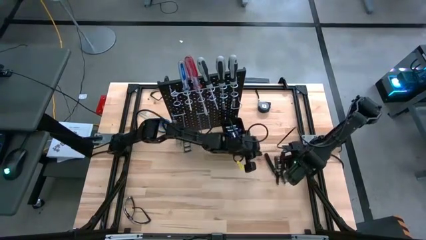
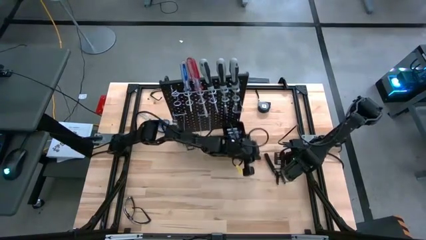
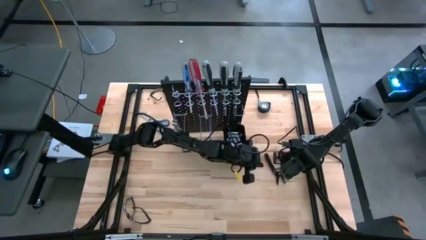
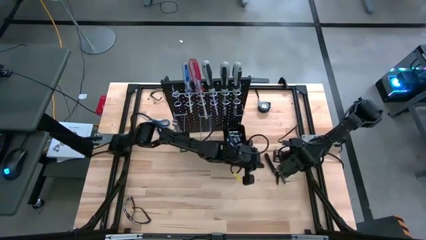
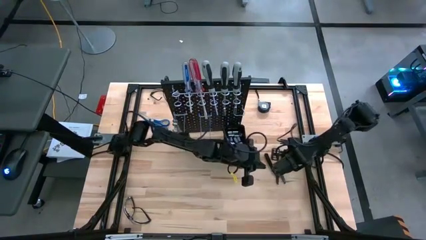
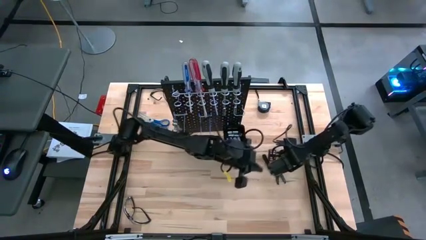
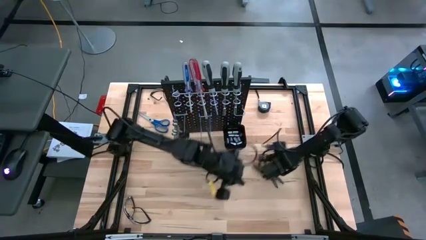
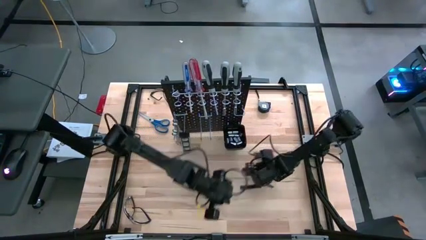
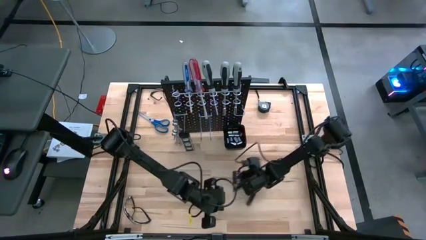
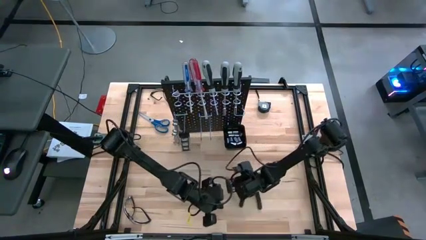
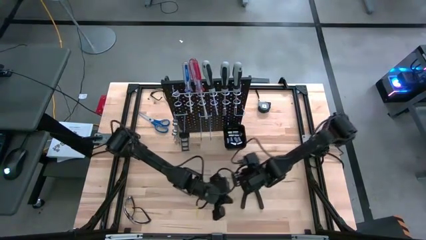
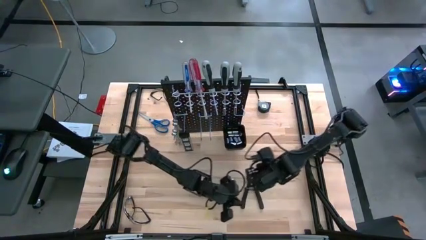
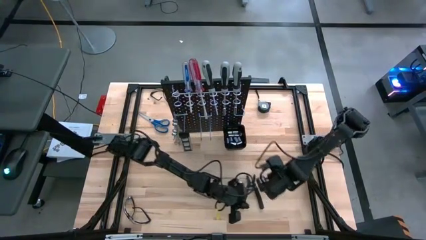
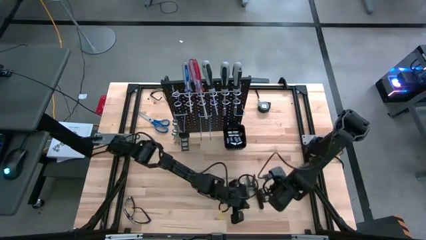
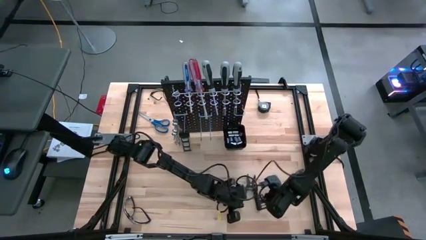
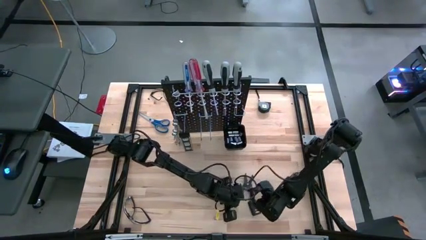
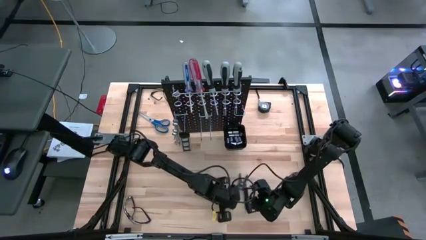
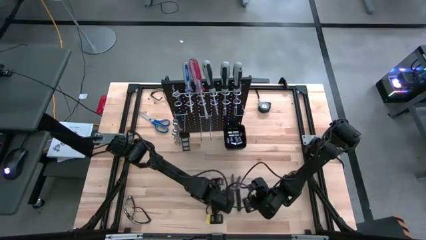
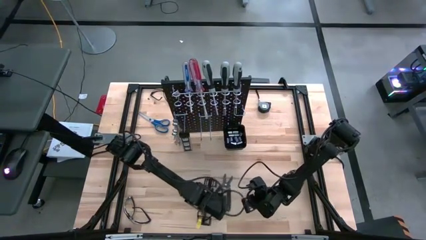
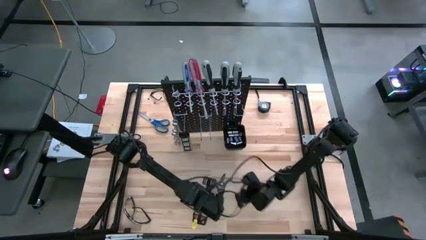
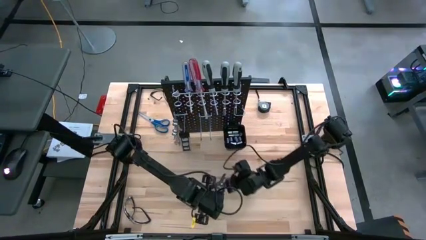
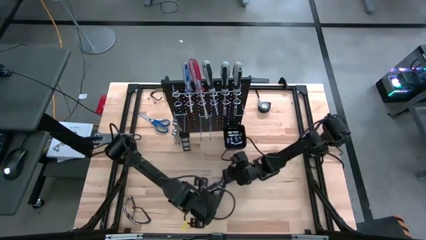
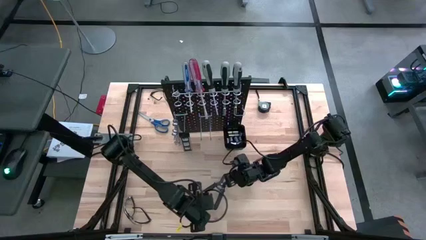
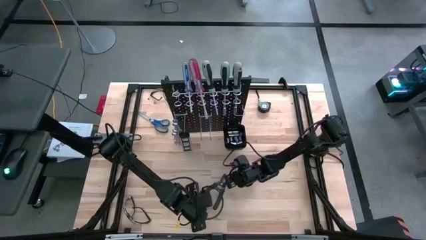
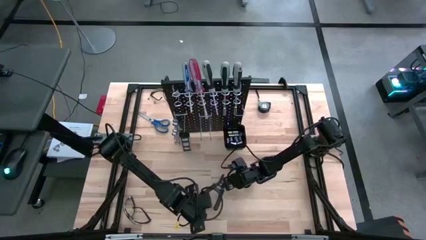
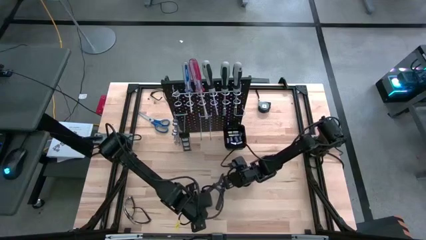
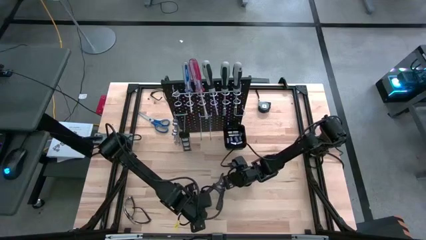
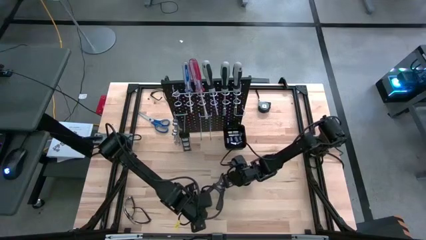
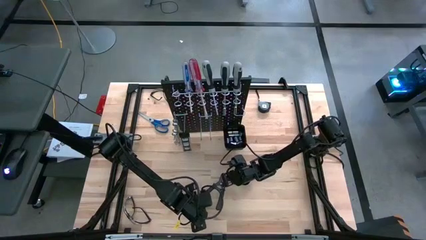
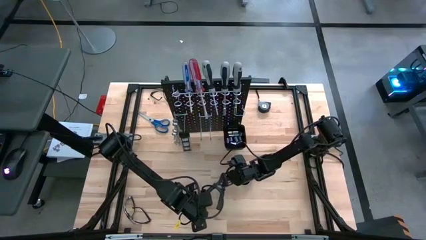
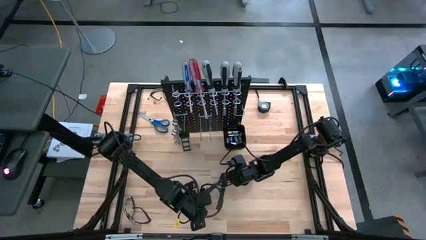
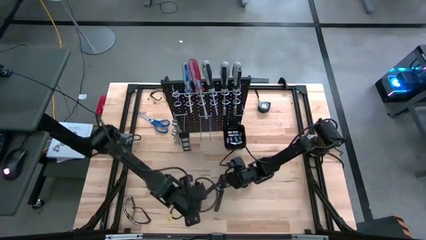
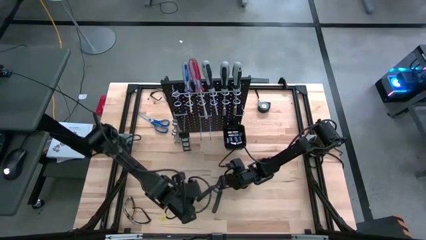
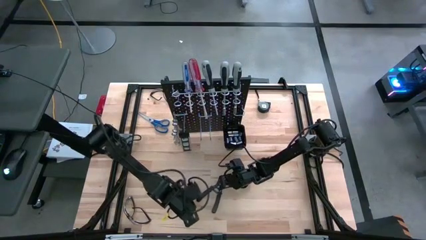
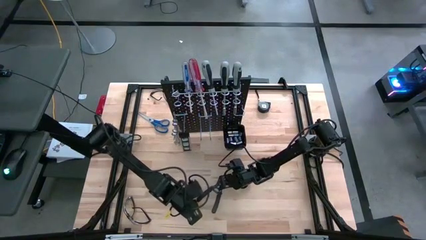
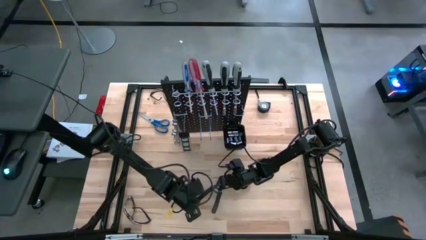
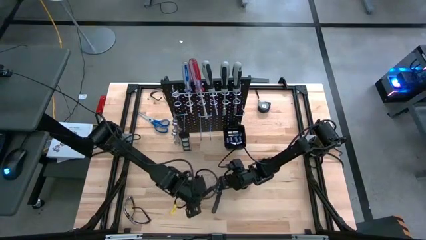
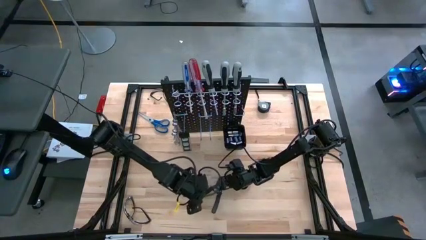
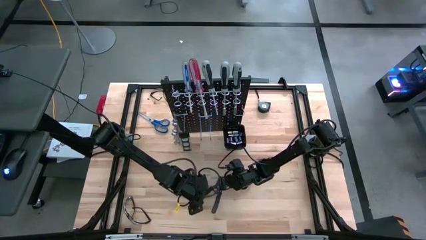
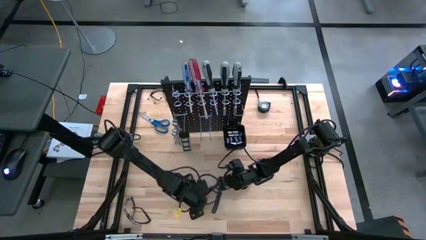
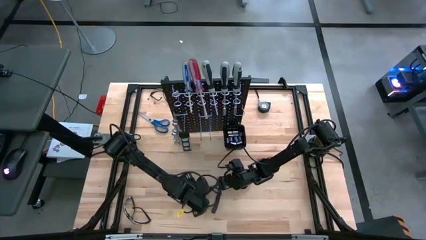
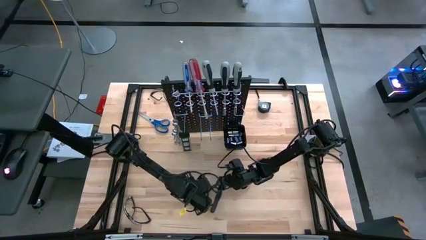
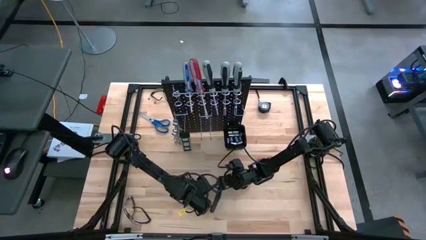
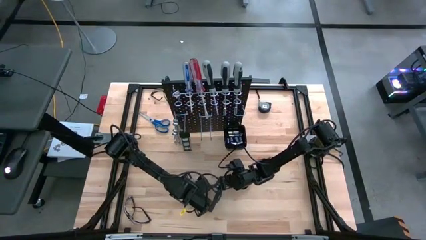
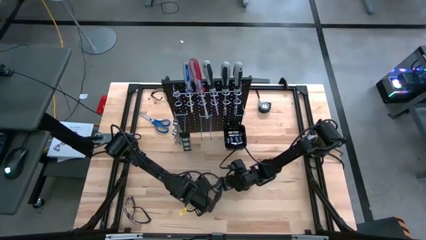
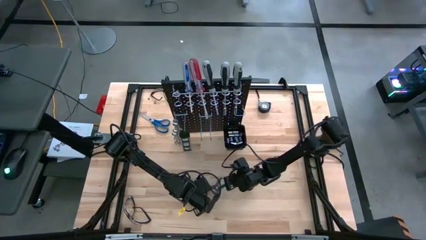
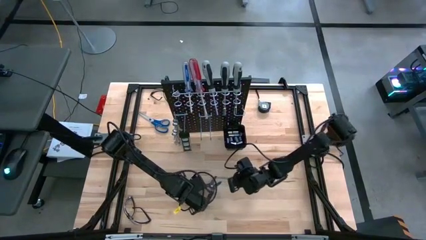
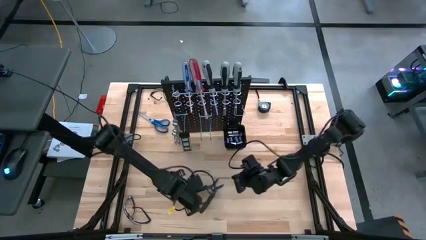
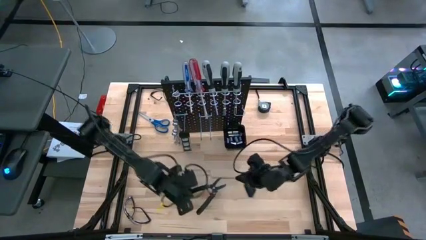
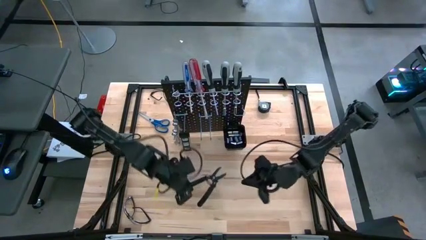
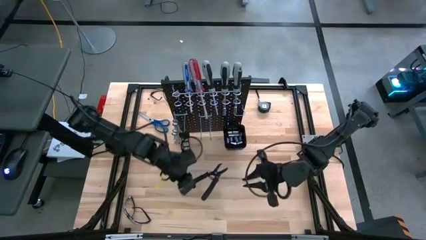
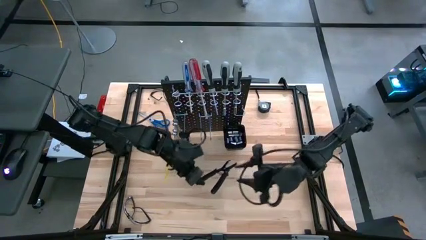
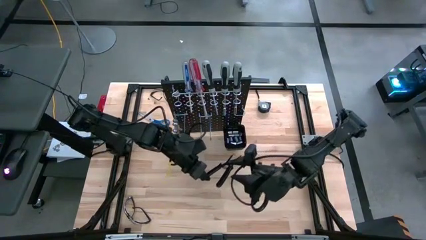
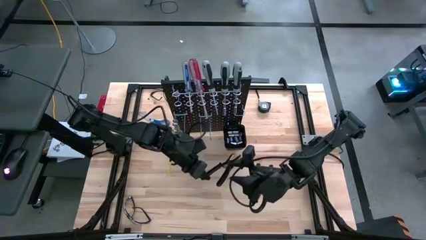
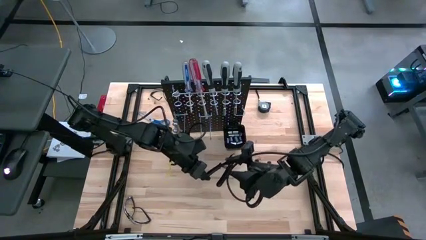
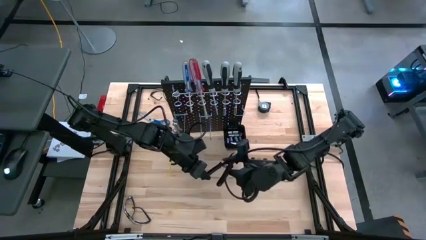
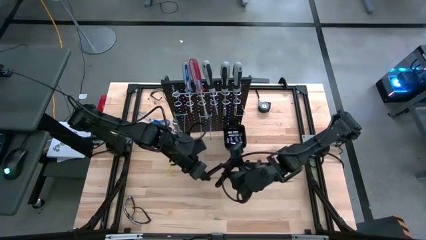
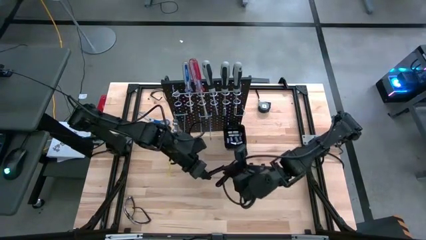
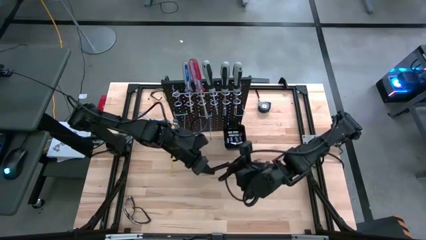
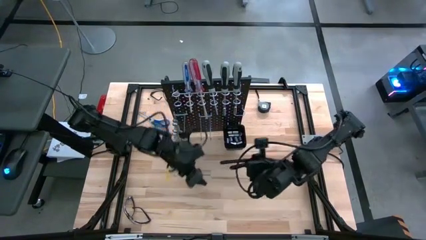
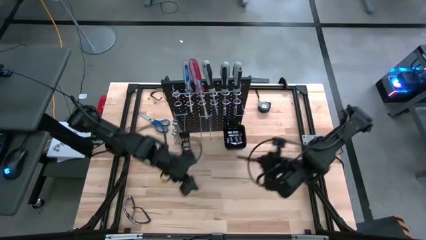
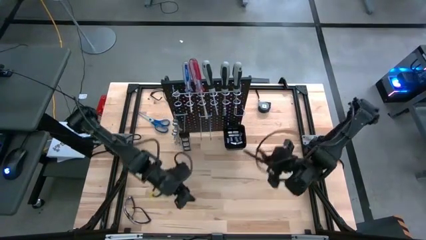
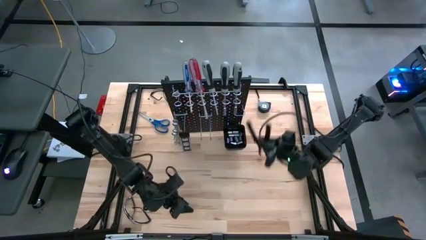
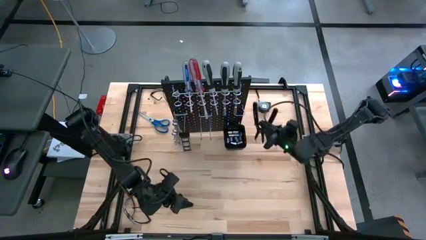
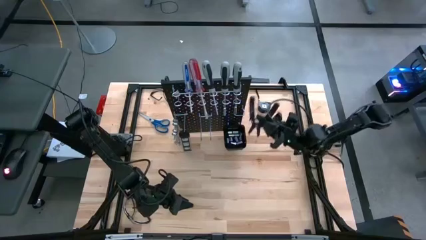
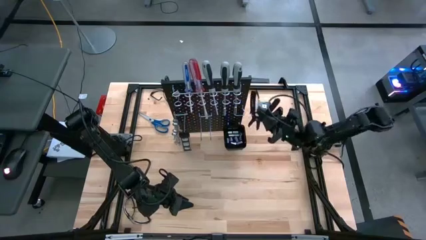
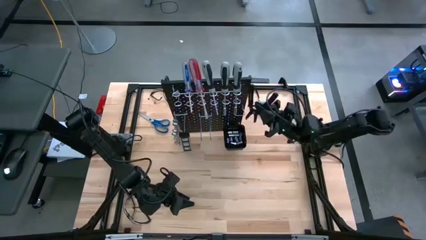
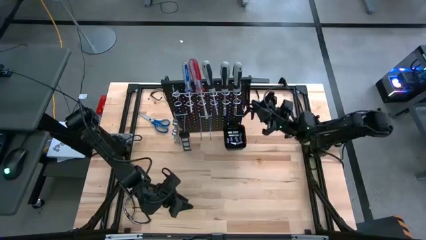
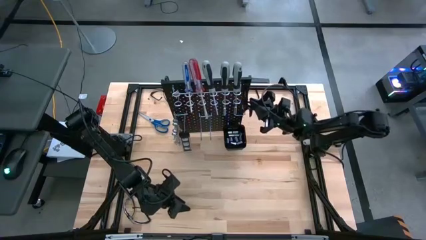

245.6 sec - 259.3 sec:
Task: Hang tools onto peg board
Hang the black pliers on the pegboard

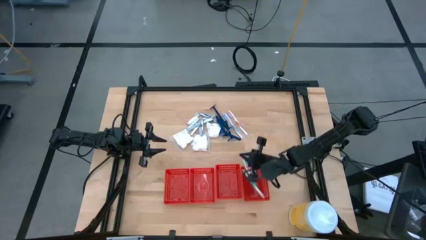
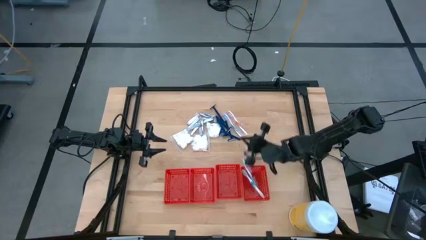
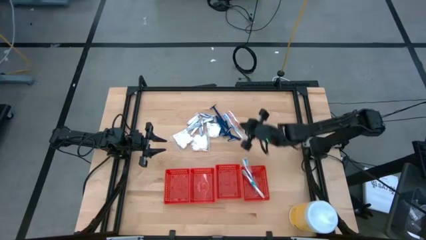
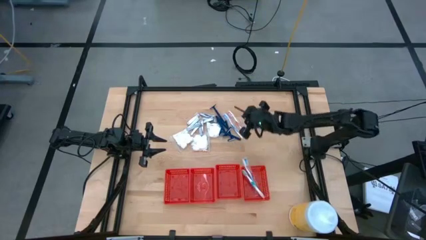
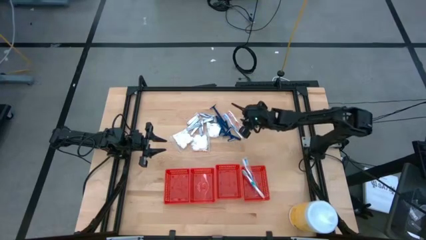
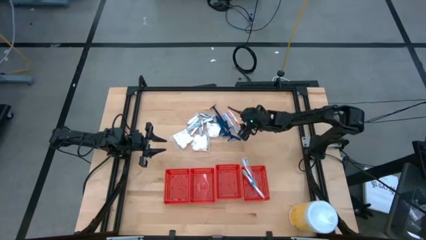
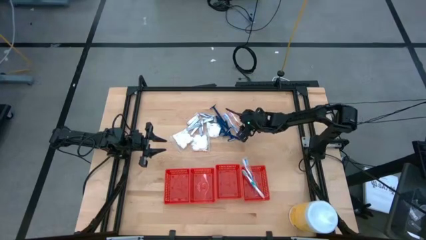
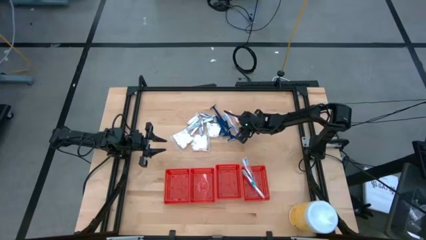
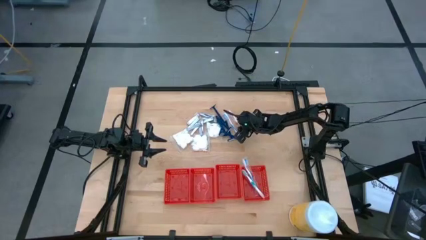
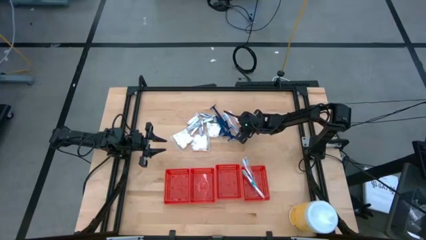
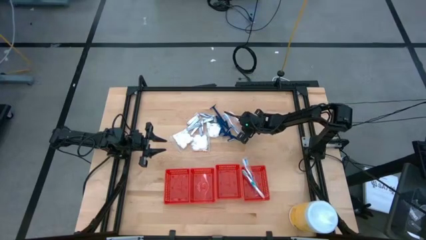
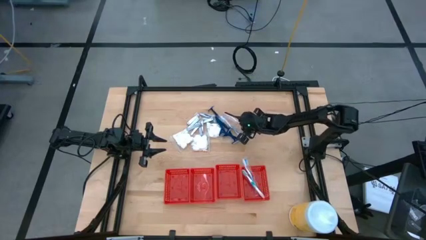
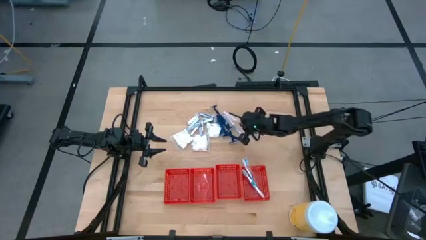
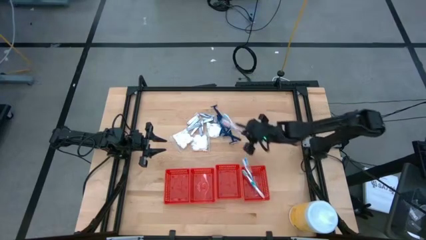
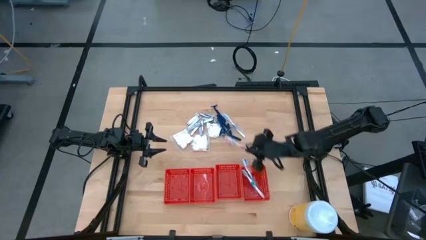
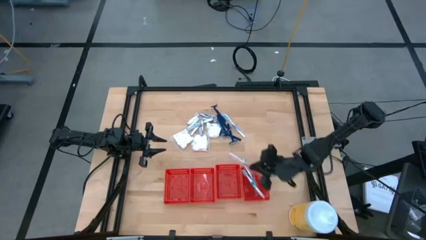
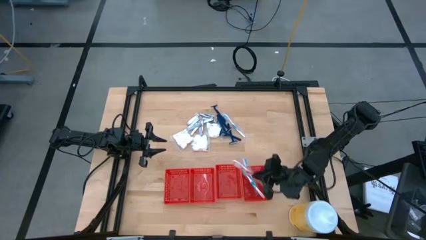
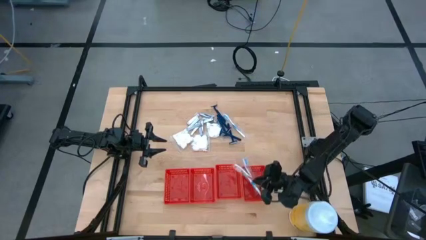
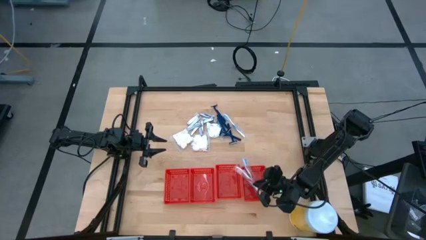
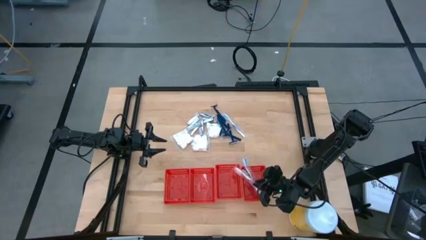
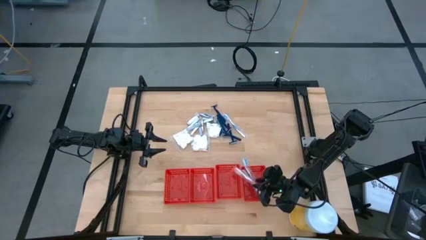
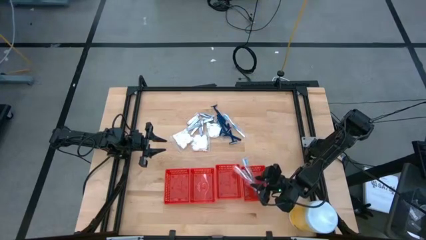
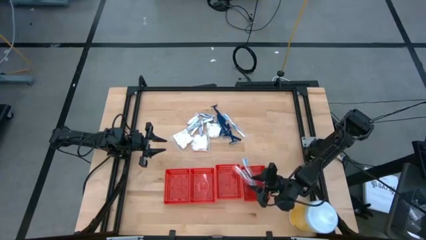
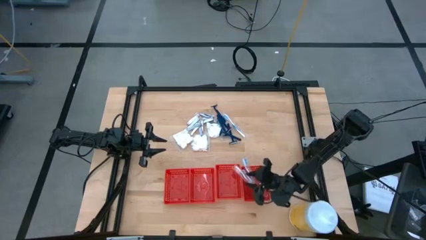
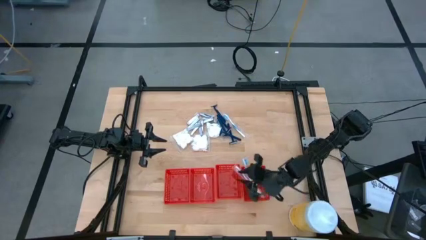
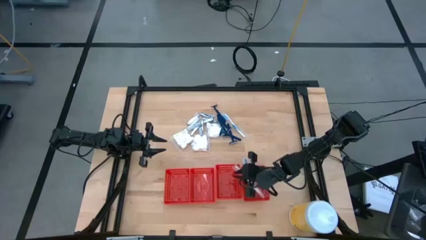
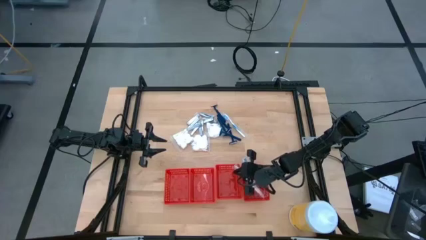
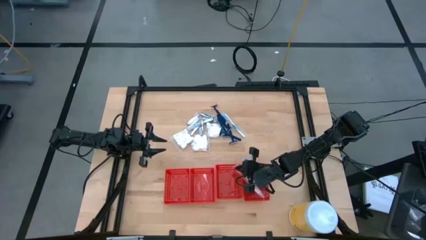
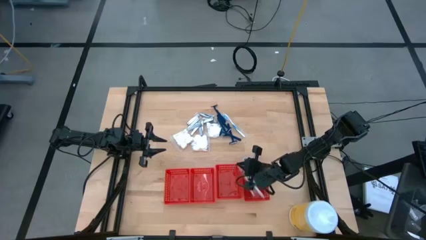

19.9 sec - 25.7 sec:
Task: Pick & Place Travel size toiletries
Put the red toothbrush into the right red bin
